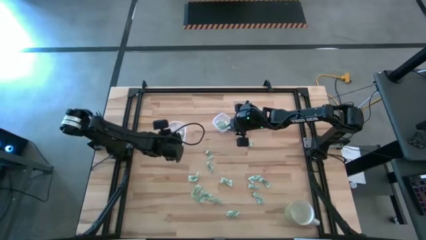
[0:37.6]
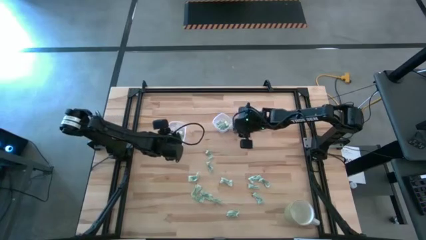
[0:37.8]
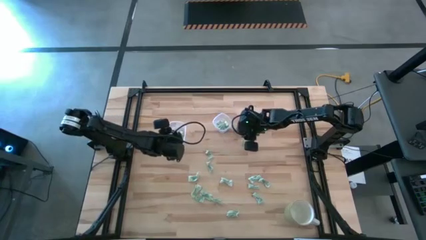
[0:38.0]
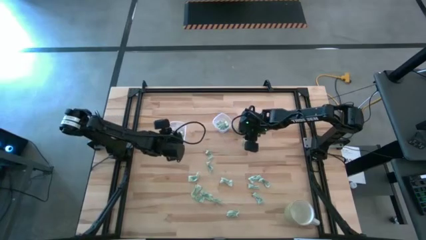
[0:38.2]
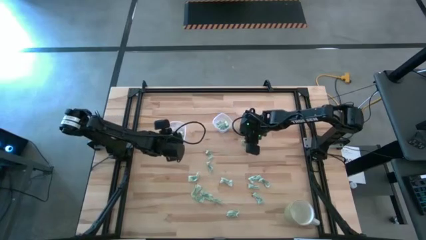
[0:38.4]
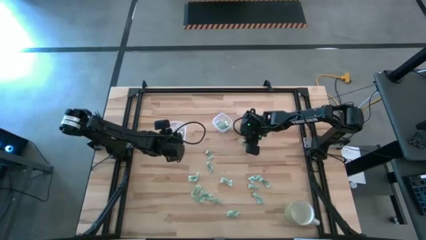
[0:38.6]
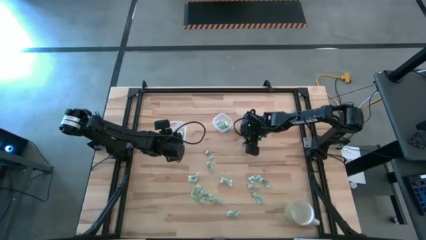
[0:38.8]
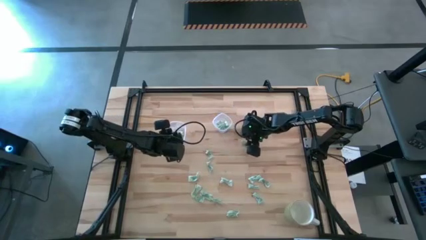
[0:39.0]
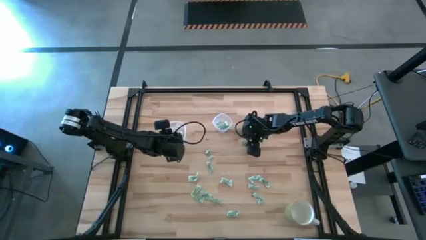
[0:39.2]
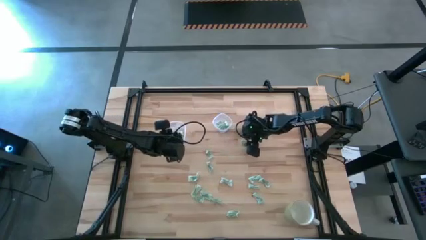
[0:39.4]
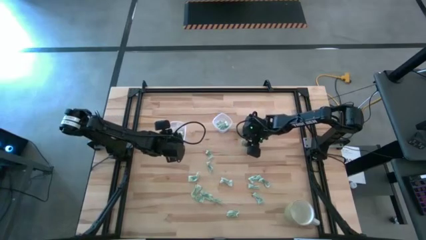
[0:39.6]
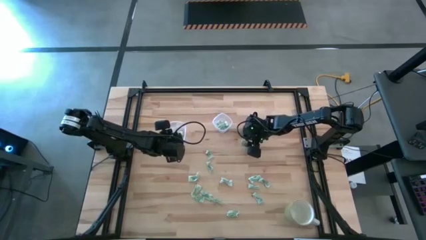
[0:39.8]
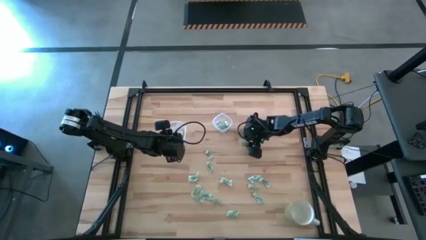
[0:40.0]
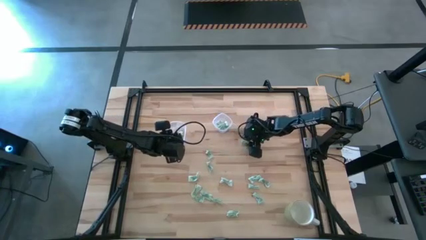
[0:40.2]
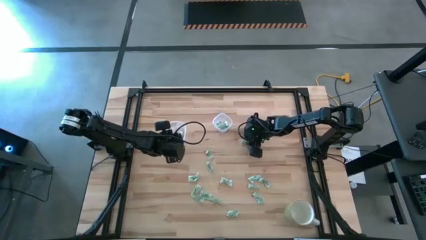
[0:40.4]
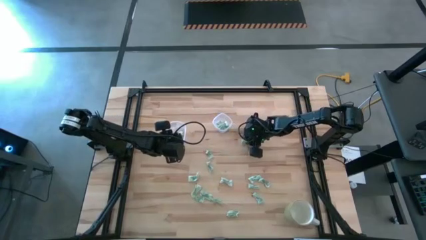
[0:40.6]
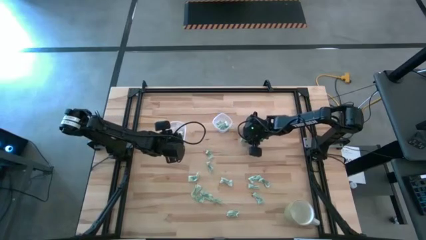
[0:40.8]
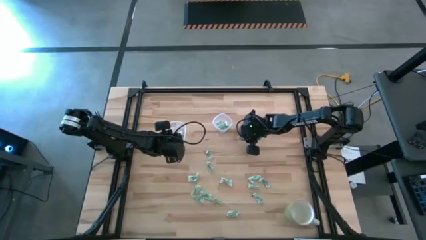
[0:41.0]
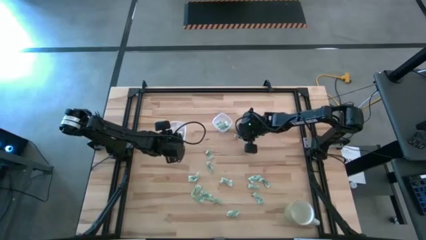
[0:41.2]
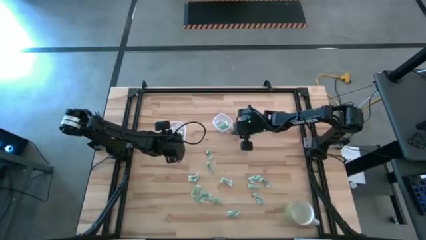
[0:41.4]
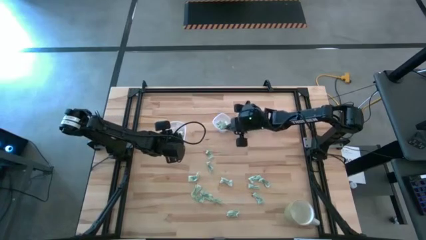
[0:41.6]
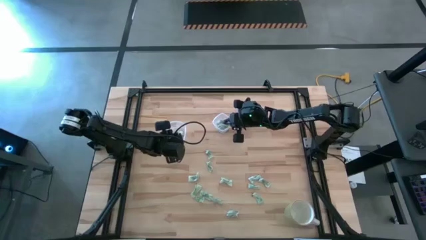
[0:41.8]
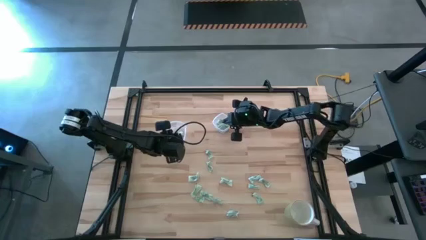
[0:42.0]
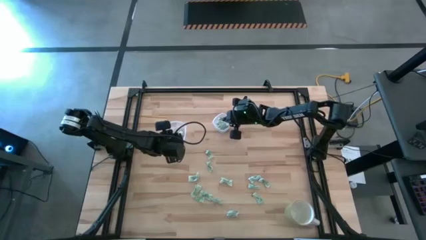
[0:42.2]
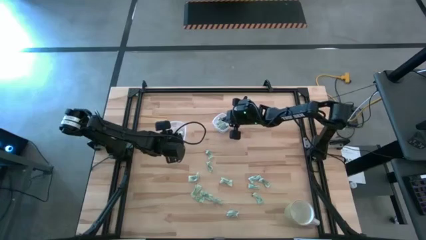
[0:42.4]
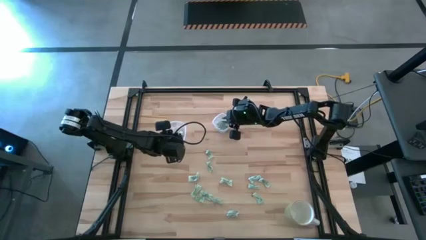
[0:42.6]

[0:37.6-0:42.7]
Task: Pick and place items into bin
Put the stevia packet into the small transparent container

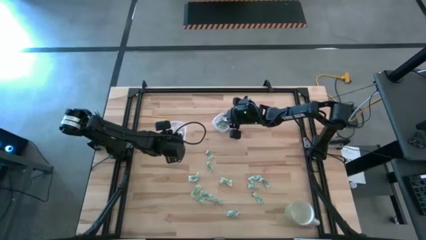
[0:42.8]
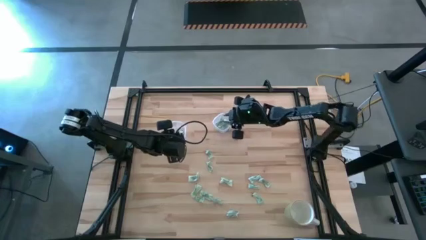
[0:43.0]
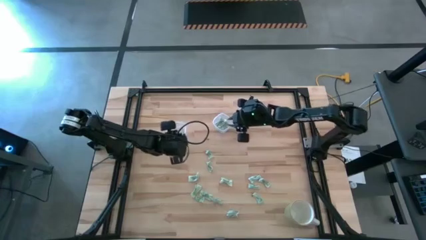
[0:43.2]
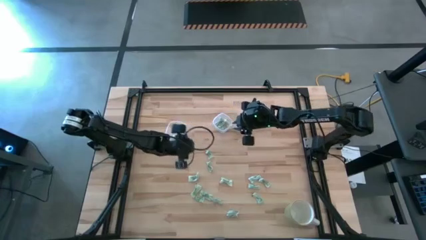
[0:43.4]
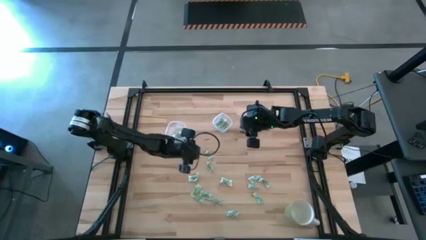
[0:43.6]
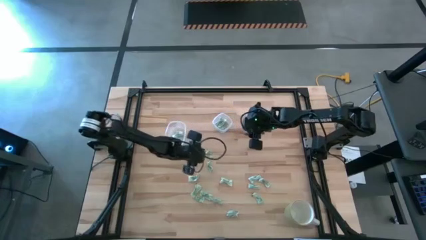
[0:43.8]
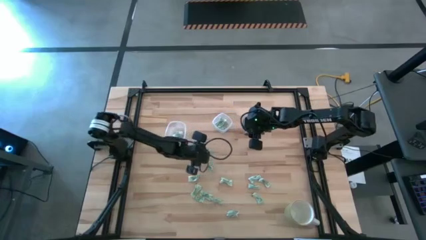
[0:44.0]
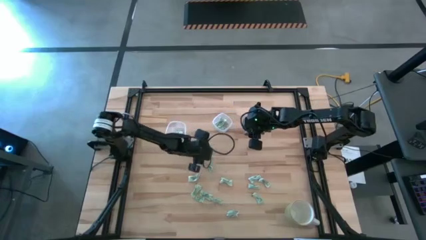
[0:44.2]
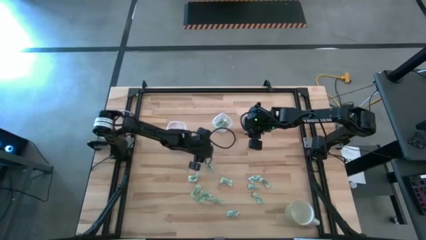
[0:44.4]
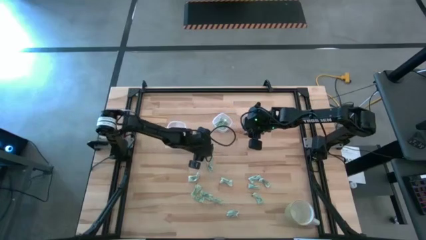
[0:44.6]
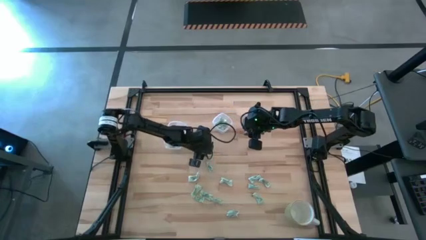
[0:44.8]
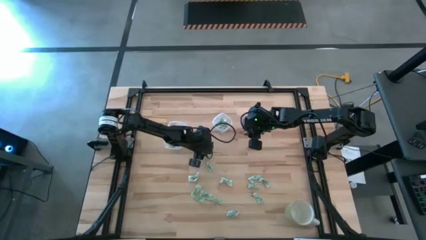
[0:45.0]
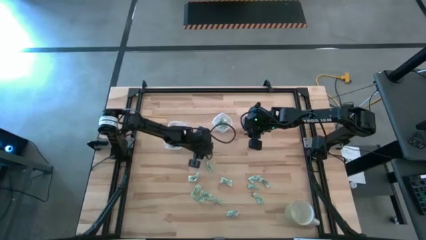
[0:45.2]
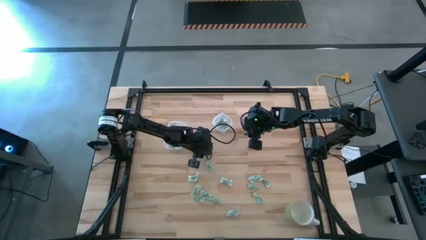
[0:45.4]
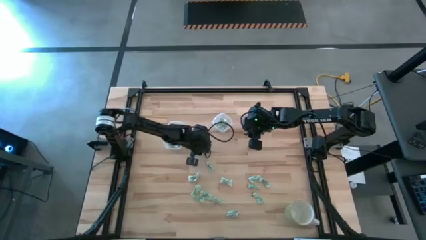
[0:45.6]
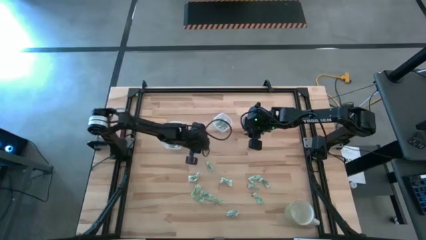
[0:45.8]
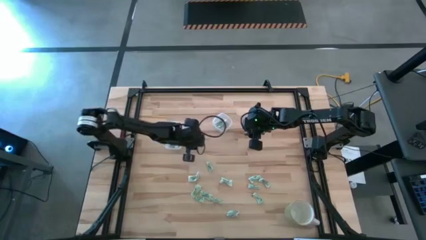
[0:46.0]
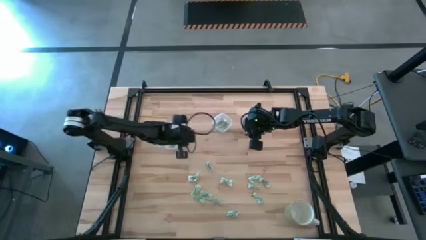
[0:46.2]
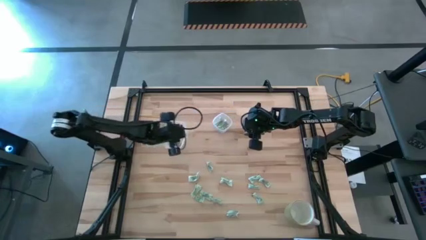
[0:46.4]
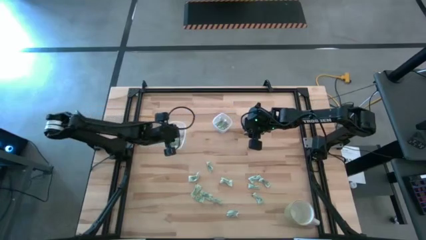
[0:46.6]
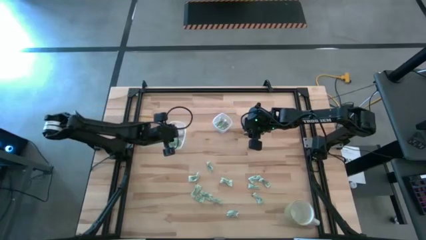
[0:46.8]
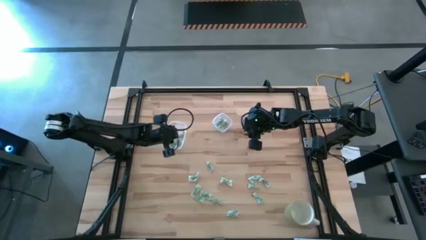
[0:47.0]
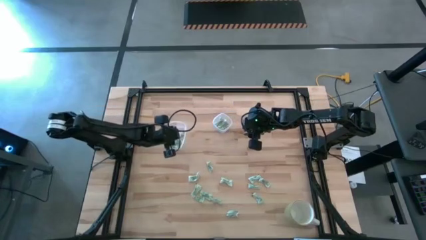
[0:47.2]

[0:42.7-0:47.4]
Put the stevia packet into the large transparent container

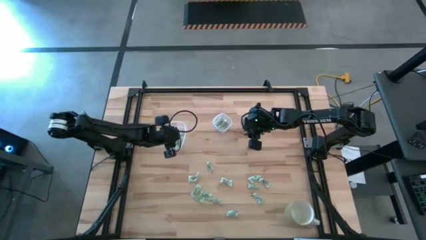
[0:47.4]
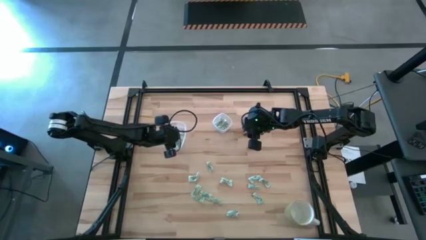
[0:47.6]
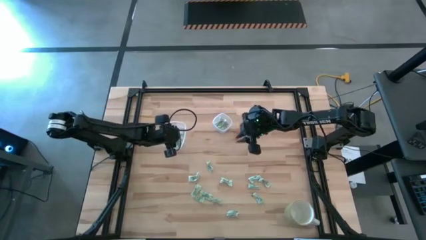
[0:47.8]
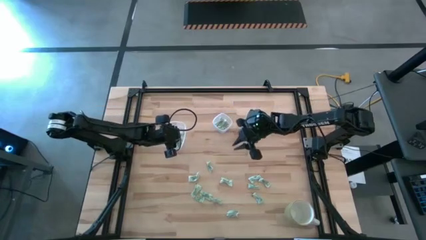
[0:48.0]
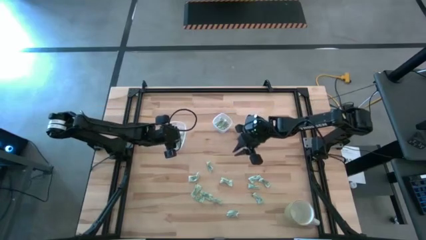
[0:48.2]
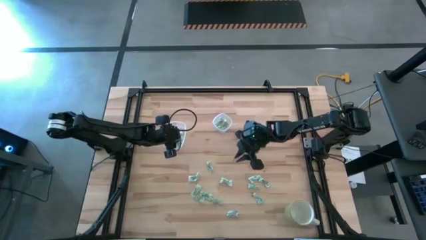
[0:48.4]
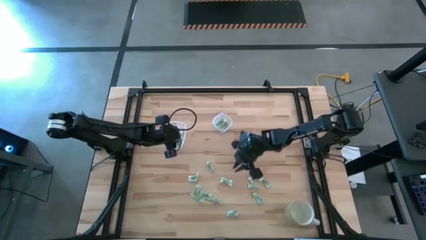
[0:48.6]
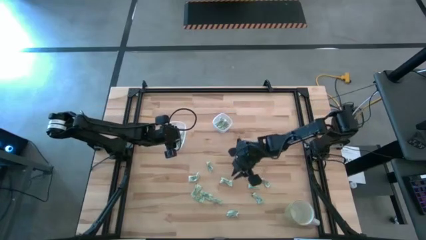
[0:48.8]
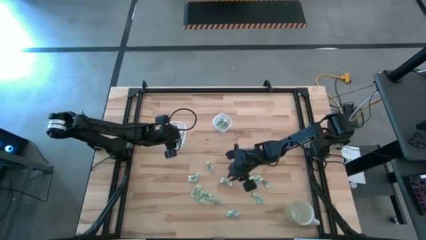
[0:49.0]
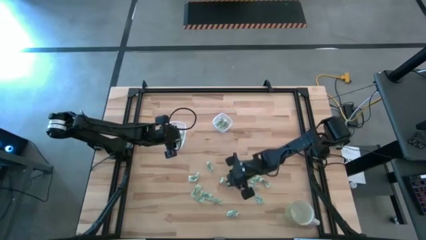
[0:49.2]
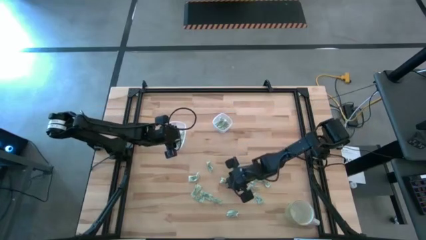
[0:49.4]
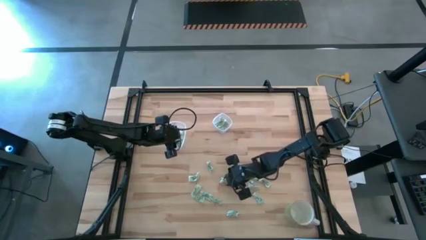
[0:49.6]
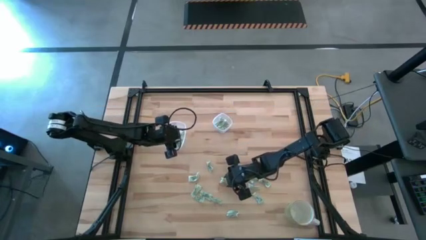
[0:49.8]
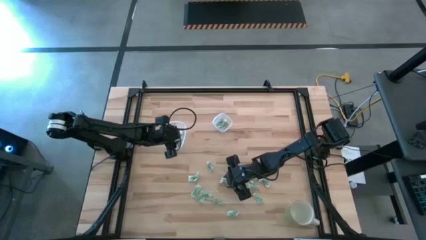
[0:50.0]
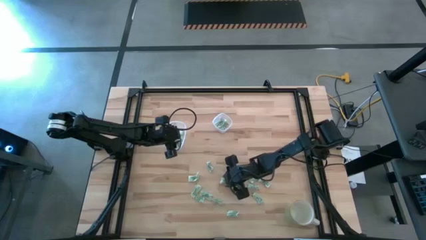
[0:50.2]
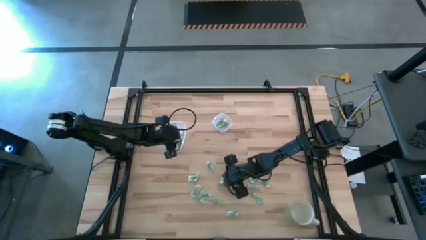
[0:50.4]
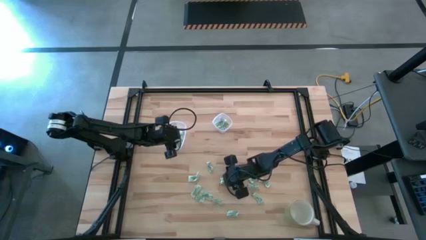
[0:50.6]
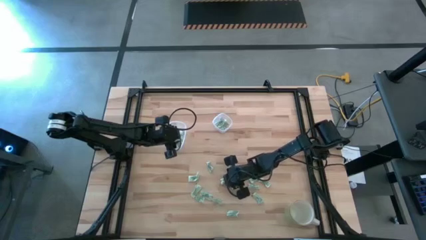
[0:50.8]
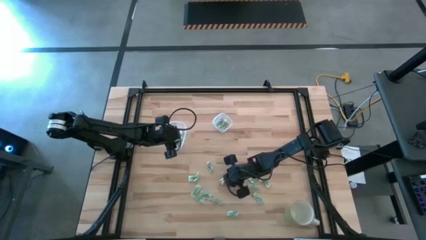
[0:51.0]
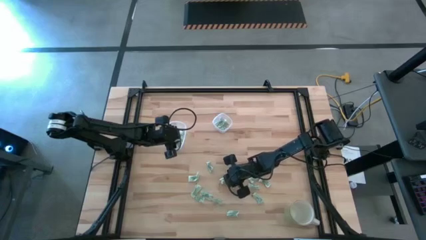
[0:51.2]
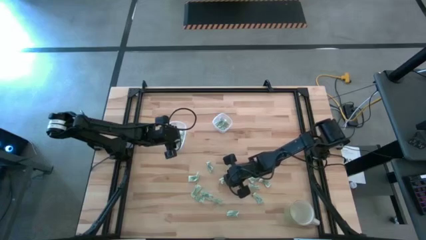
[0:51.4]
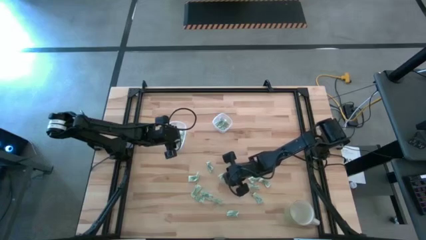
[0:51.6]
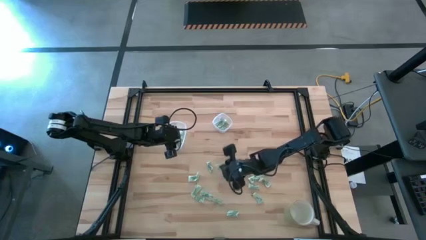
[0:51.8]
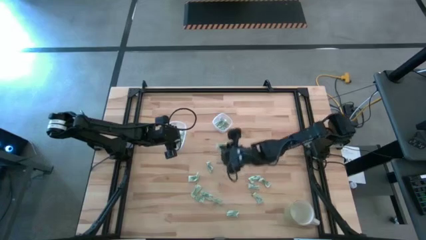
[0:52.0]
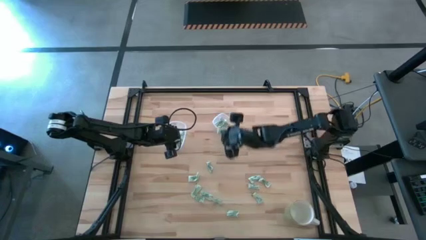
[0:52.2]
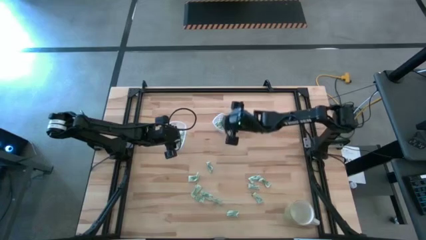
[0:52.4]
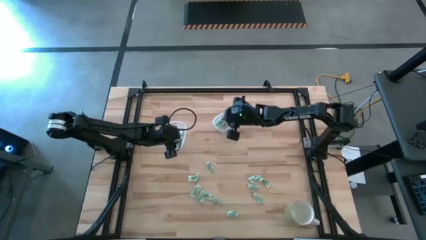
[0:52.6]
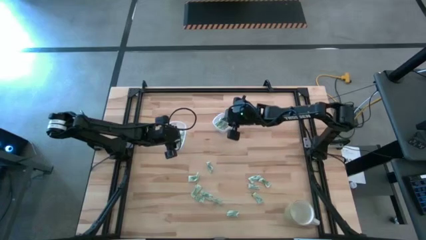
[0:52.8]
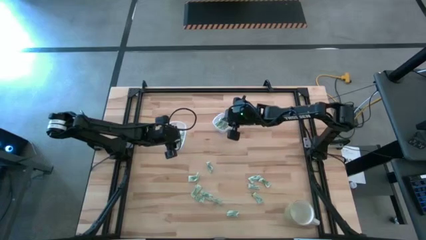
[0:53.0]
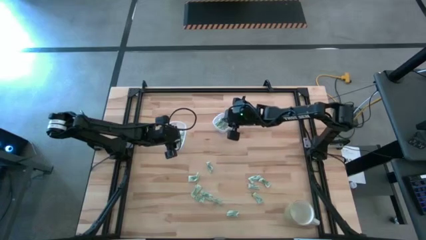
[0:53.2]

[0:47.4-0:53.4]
Put the stevia packet into the small transparent container

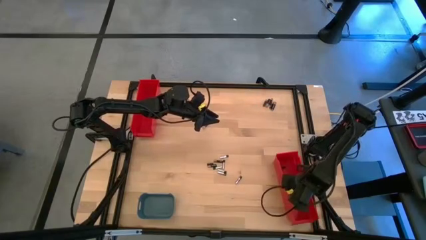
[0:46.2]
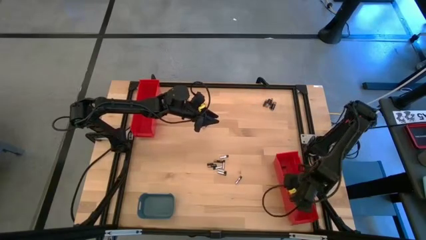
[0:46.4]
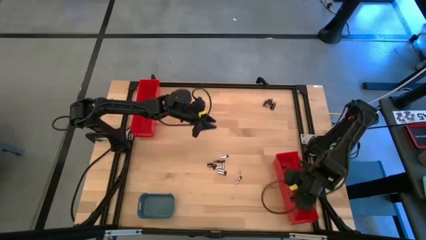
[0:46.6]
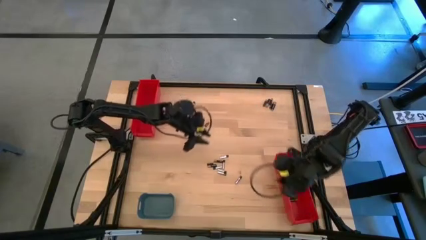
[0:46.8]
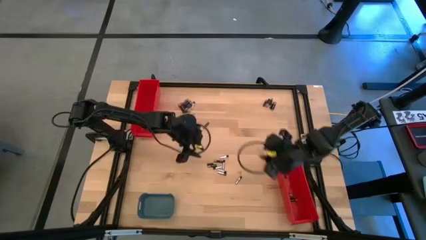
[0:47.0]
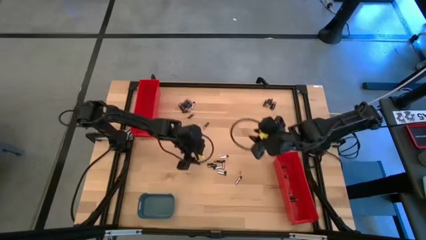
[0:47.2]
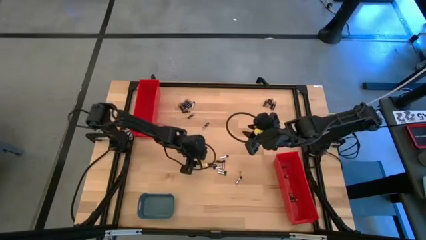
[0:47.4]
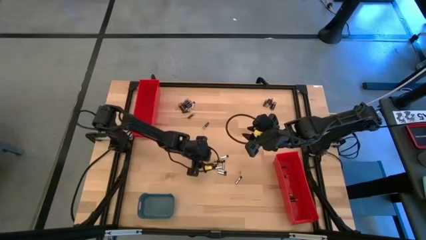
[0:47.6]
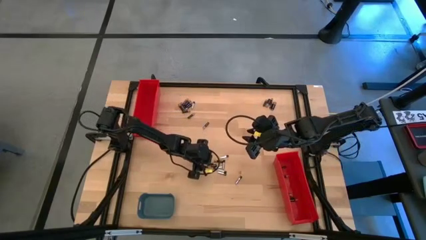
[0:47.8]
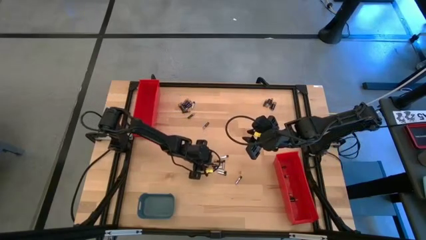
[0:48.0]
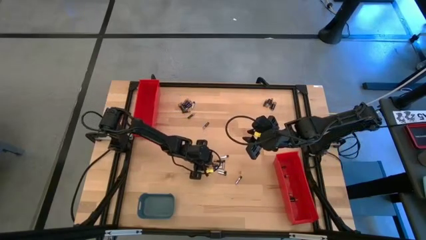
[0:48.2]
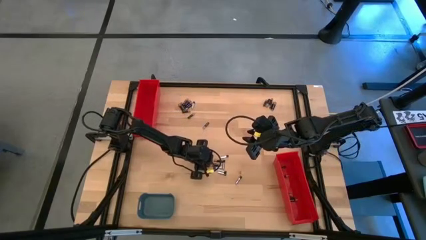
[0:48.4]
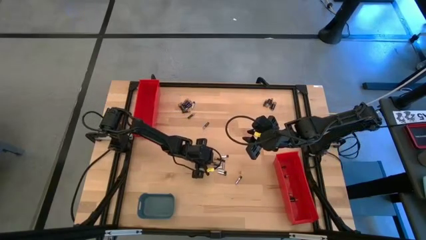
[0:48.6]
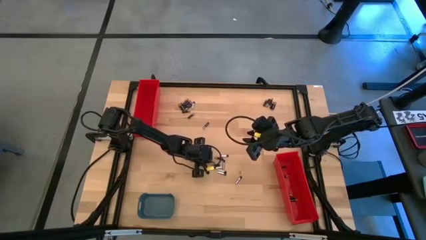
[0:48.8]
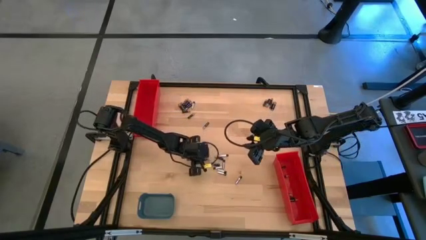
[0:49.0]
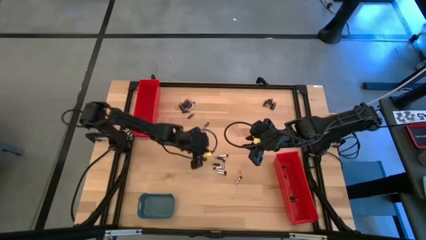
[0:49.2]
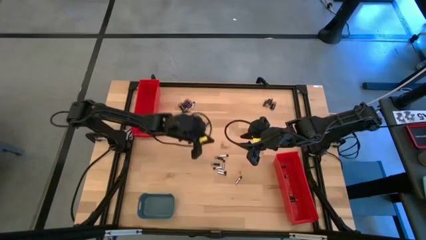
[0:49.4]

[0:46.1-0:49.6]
Task: Sort batteries
Put the small black battery into the bottom red bin
